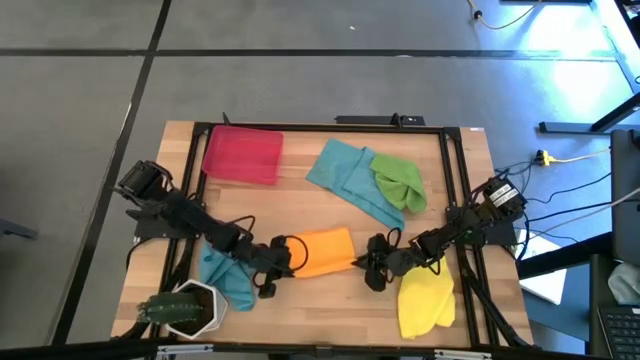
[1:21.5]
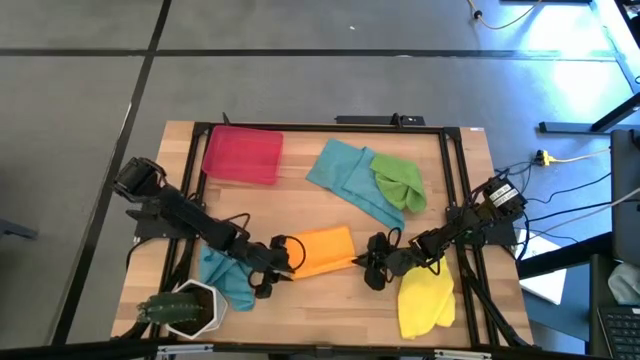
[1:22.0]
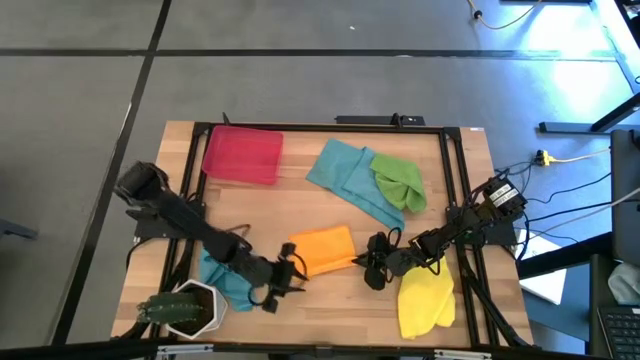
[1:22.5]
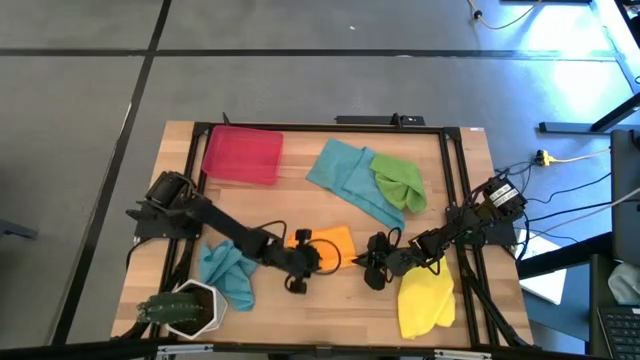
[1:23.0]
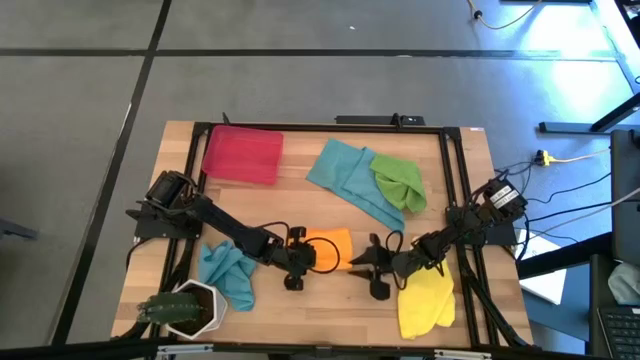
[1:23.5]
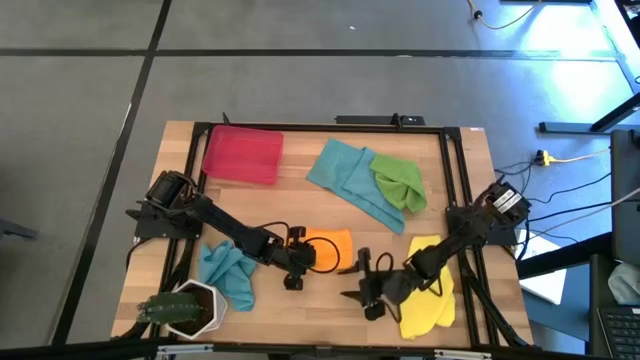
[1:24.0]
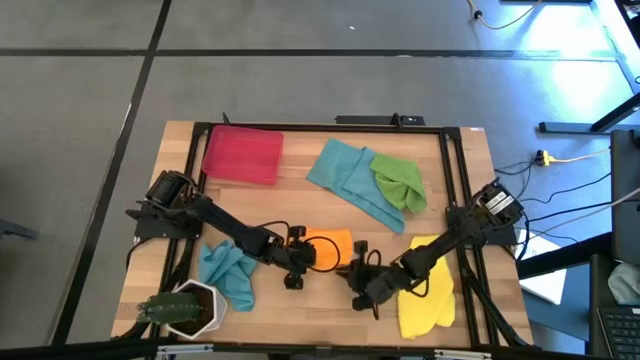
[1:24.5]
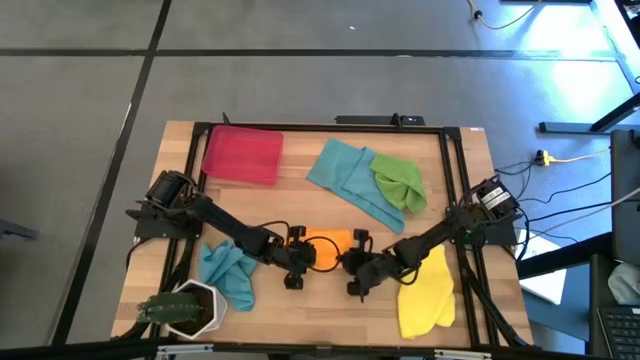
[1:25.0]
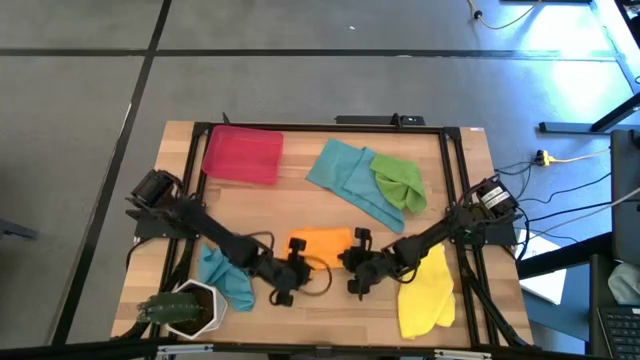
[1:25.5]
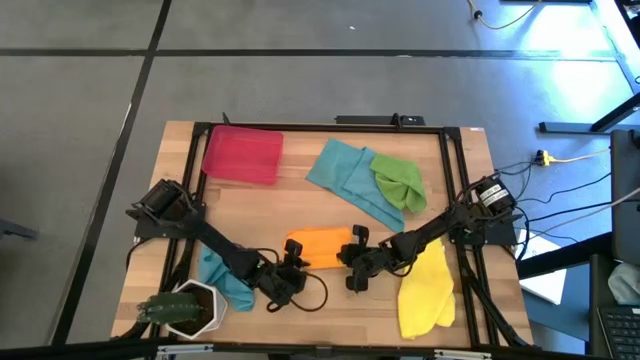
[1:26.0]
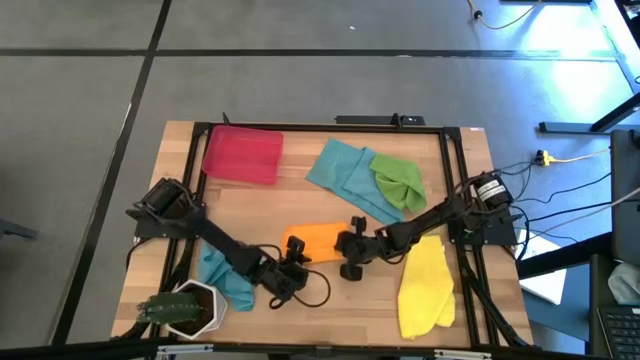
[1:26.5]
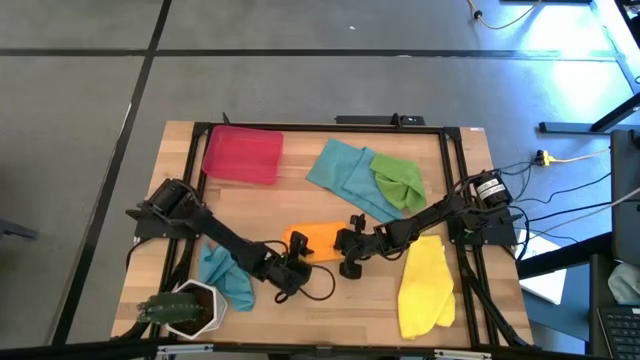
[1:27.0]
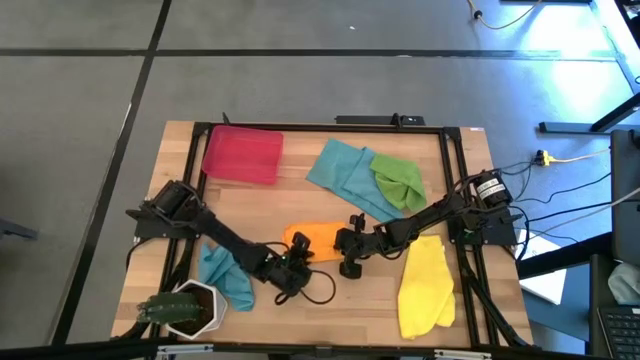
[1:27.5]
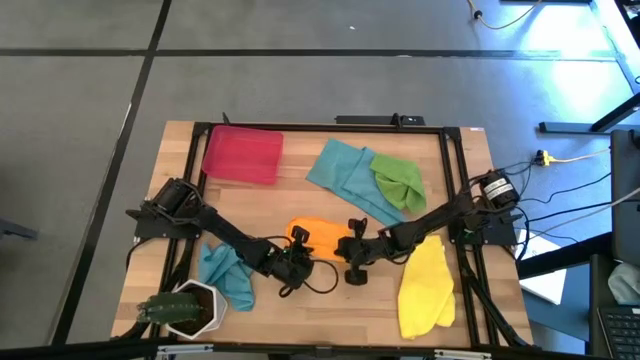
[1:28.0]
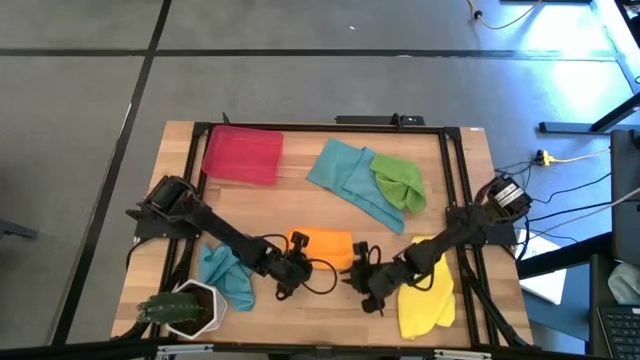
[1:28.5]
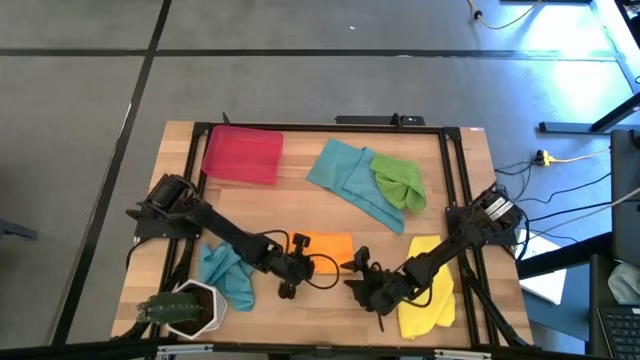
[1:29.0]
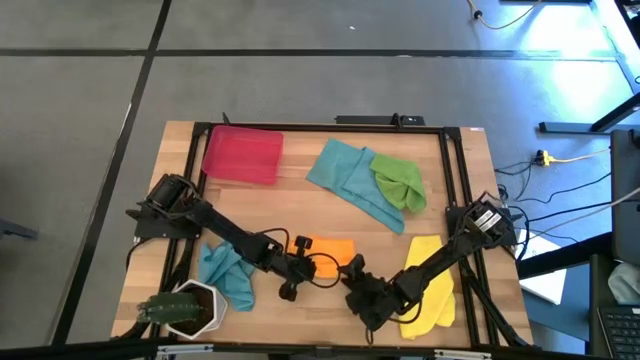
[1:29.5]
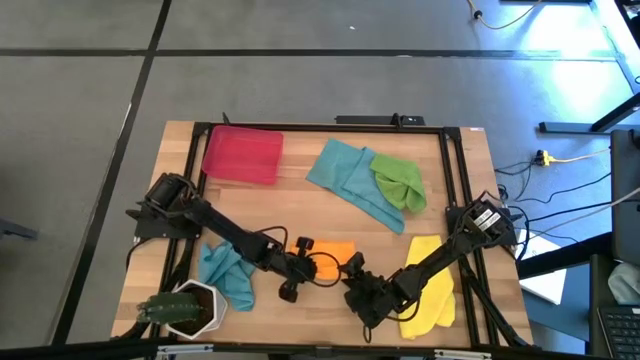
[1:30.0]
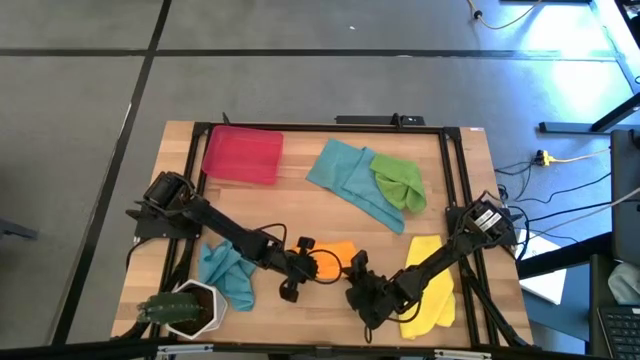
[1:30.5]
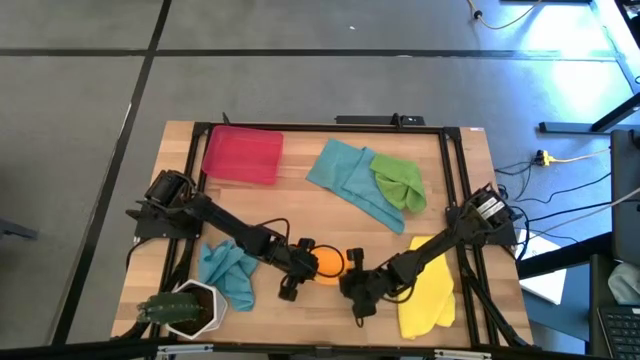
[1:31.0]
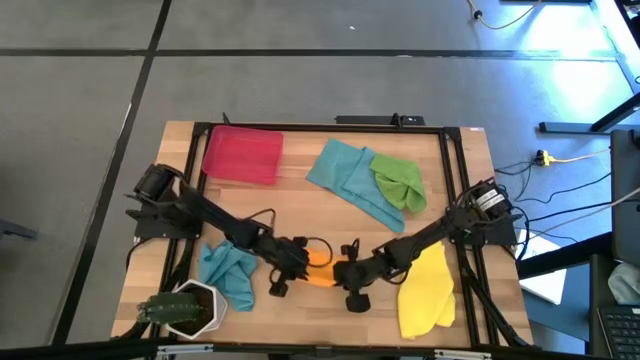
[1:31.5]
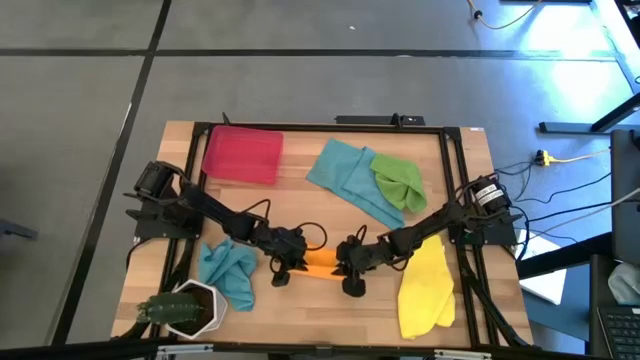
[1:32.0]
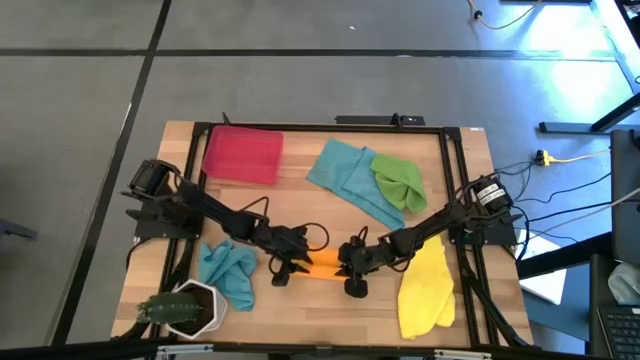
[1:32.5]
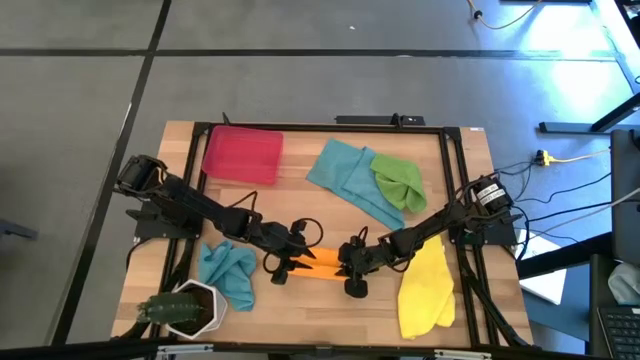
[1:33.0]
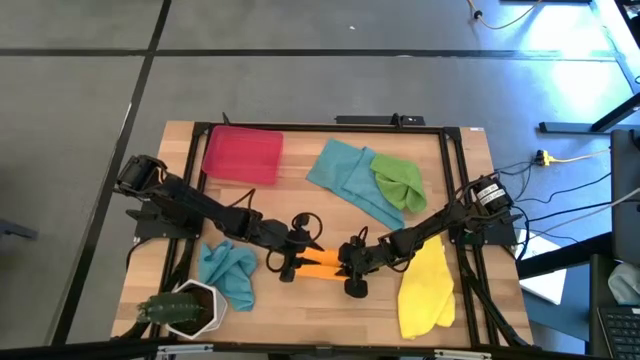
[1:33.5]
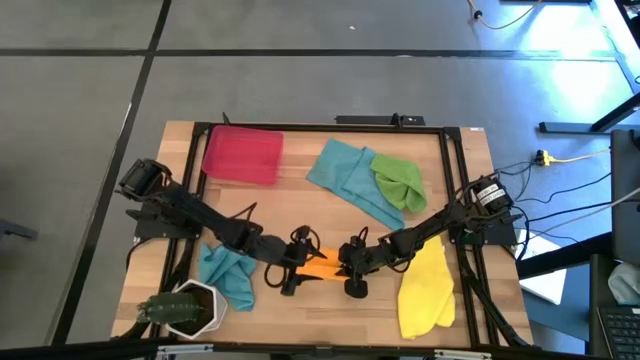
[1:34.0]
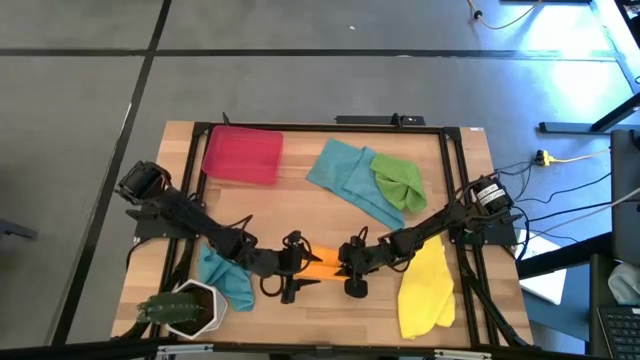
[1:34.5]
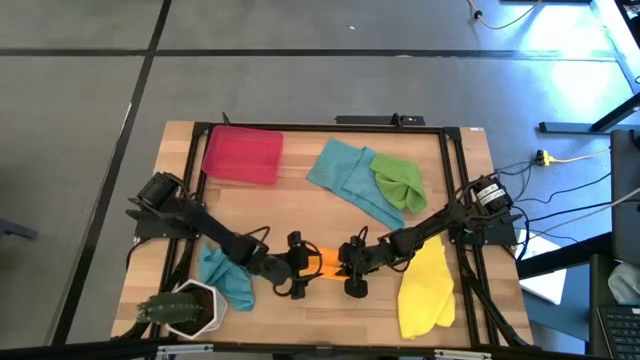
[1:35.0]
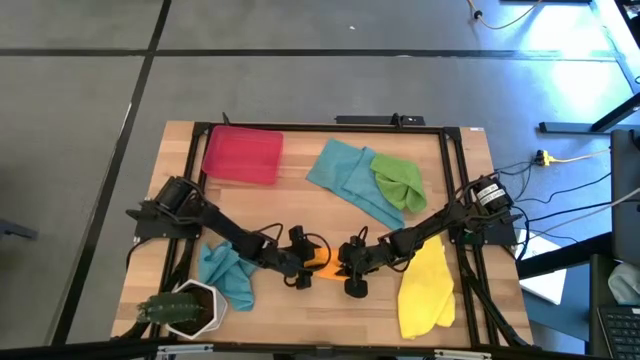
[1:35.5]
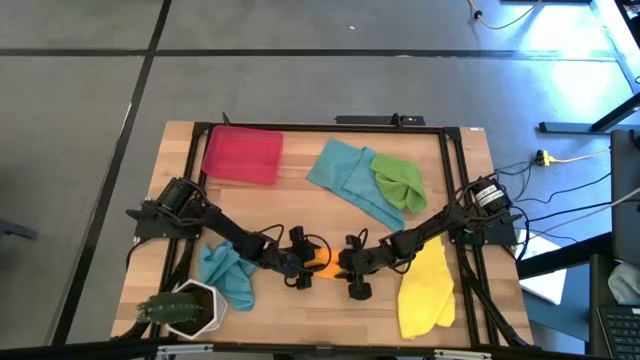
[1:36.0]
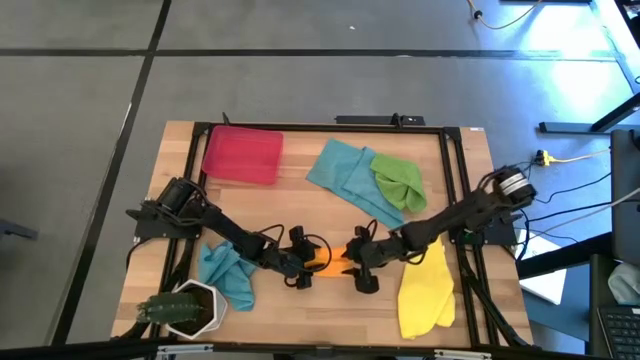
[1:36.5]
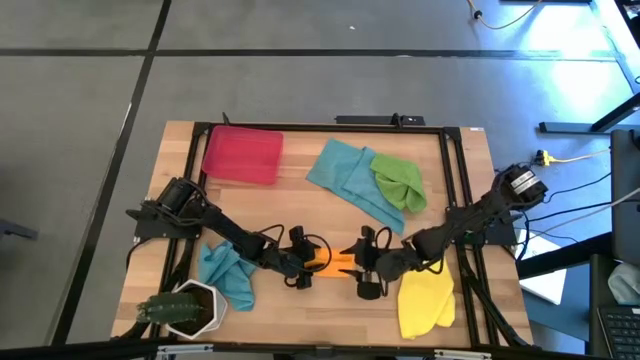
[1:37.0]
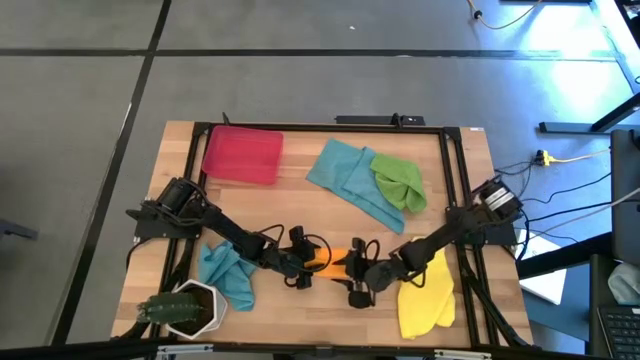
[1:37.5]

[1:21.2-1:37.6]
Task: Roll microfiber towels into tight, uniform cylinder then place into a basket
Roll the orange microfiber towel

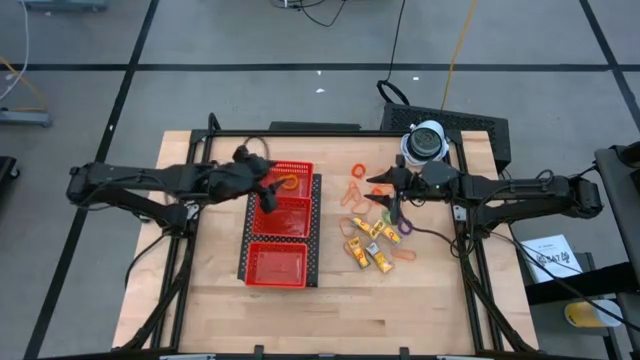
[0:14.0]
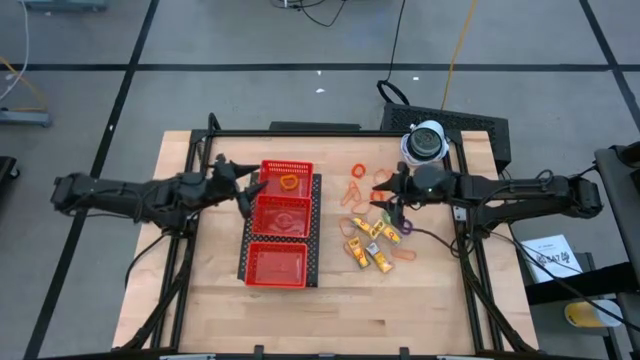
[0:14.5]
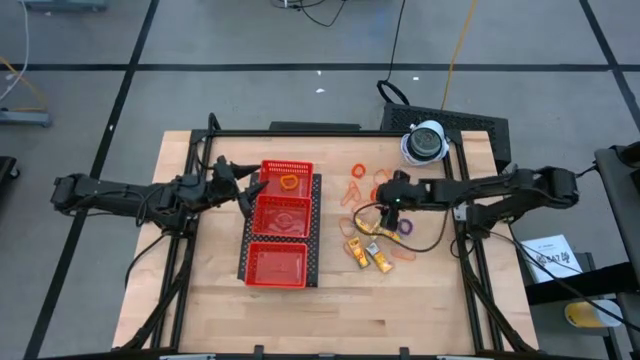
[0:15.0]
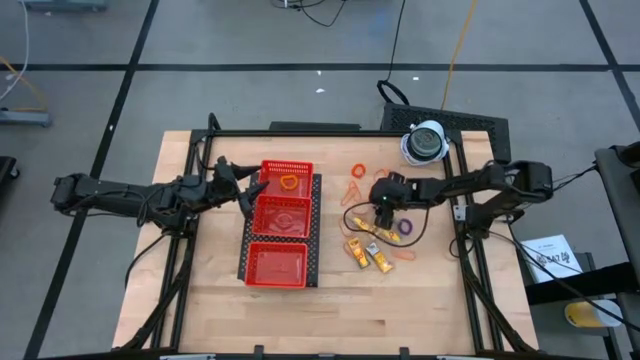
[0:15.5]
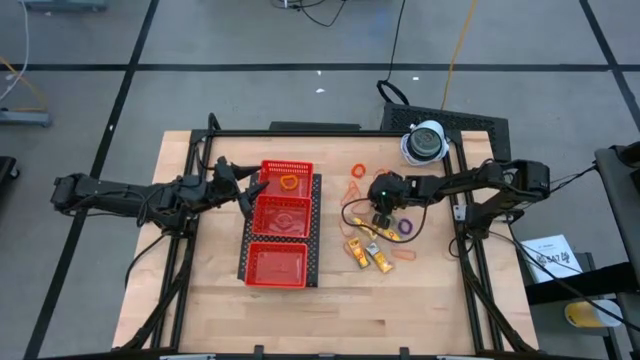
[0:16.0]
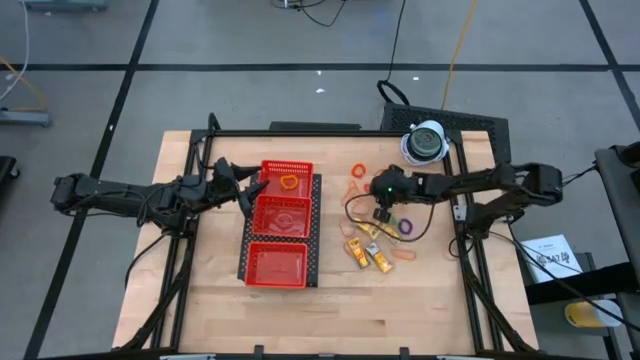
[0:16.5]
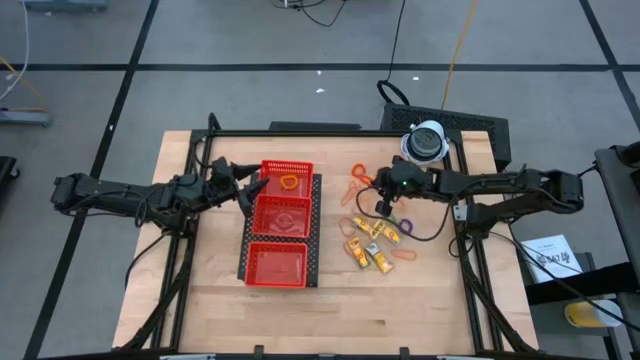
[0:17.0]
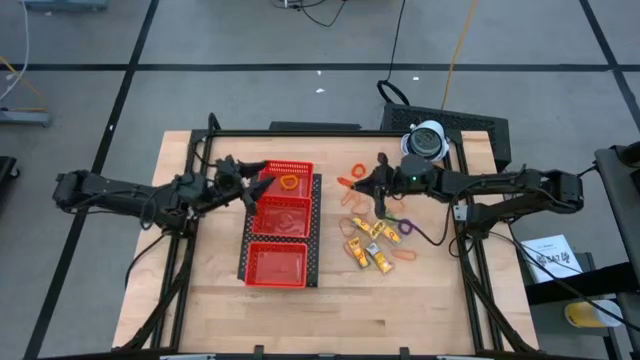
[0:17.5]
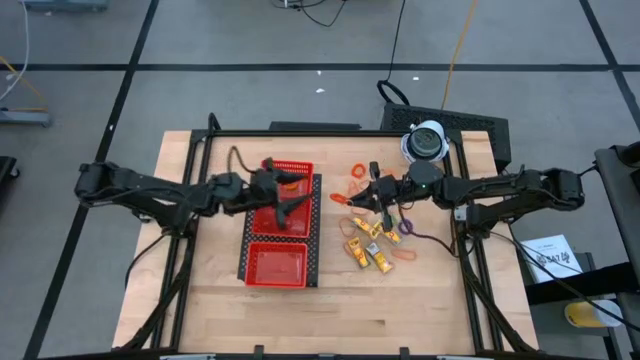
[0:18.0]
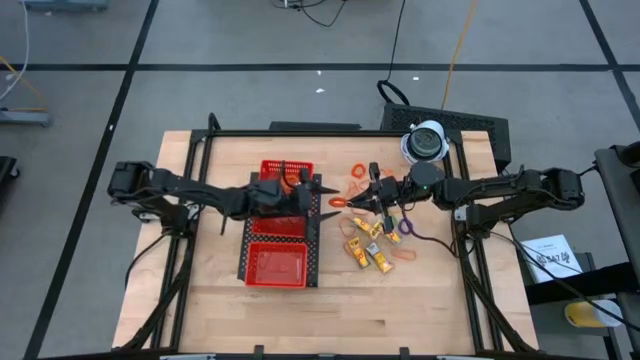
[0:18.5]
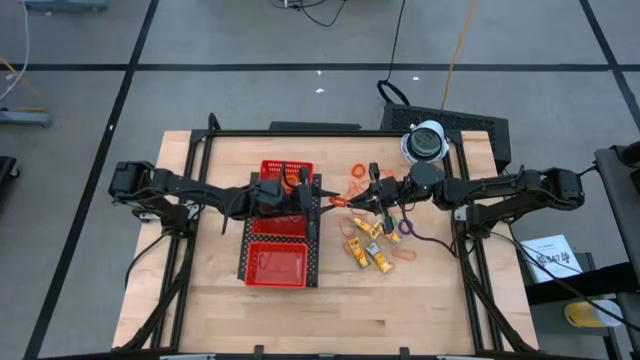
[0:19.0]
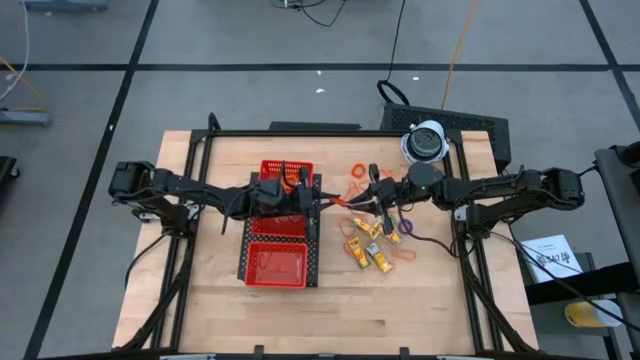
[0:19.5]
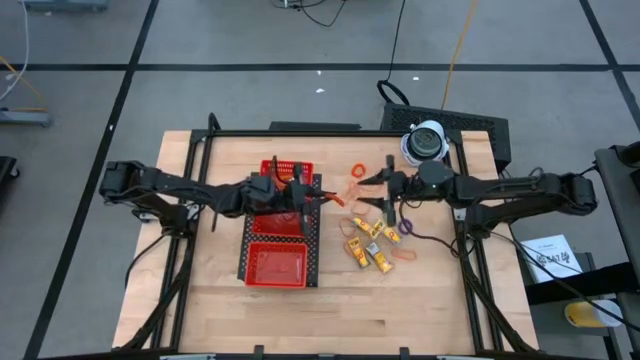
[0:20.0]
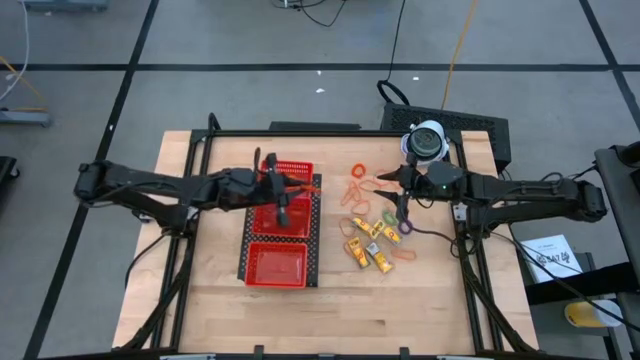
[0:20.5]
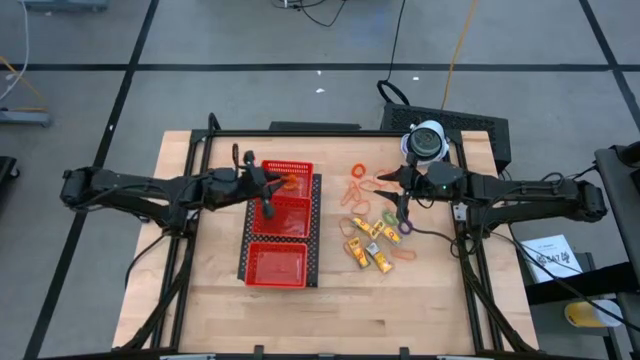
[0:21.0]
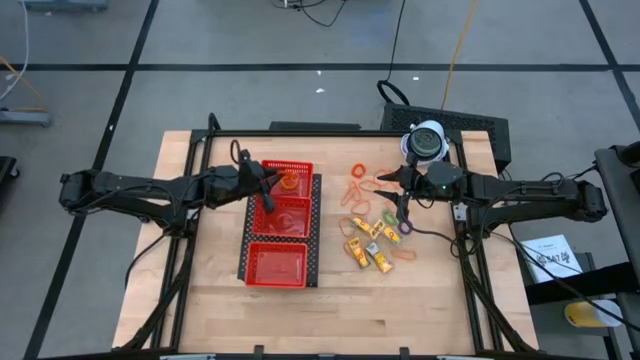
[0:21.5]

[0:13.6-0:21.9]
Task: Pick & Place Office Desk Supplies
Put the orange spring keychain into the top red basket on the shelf
